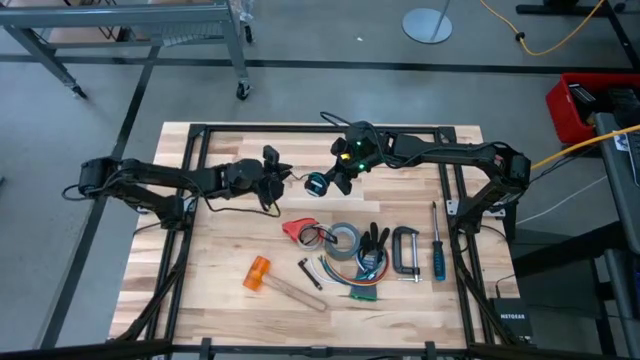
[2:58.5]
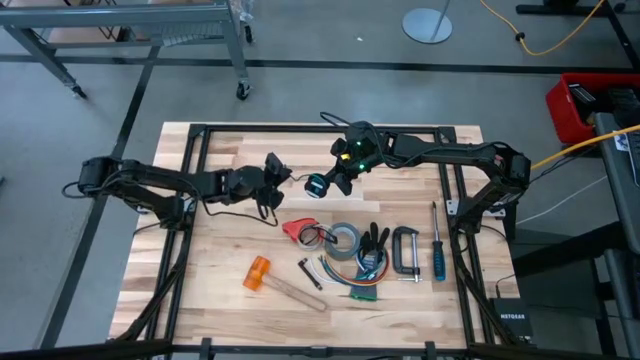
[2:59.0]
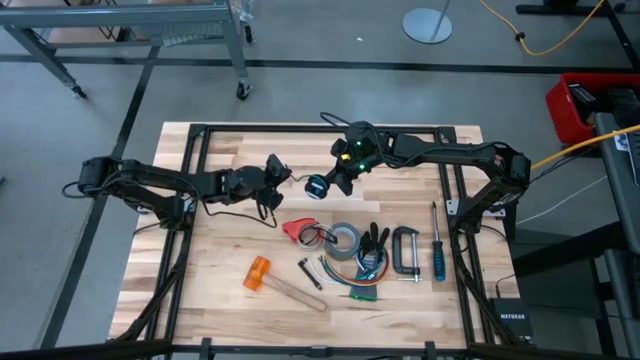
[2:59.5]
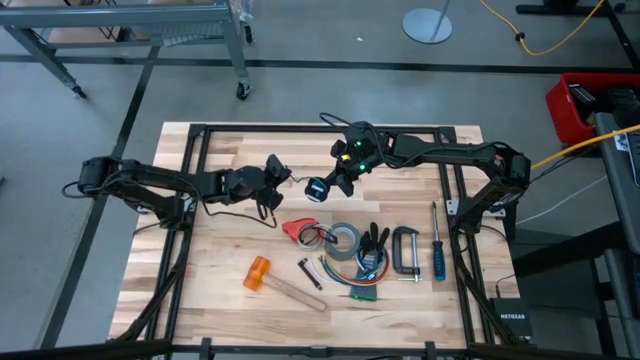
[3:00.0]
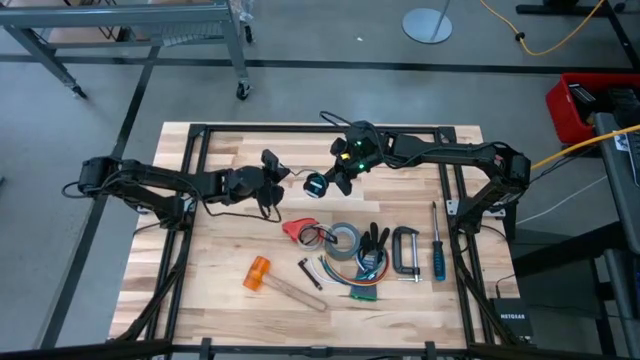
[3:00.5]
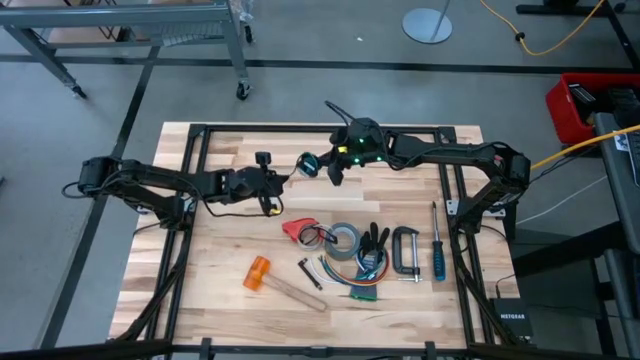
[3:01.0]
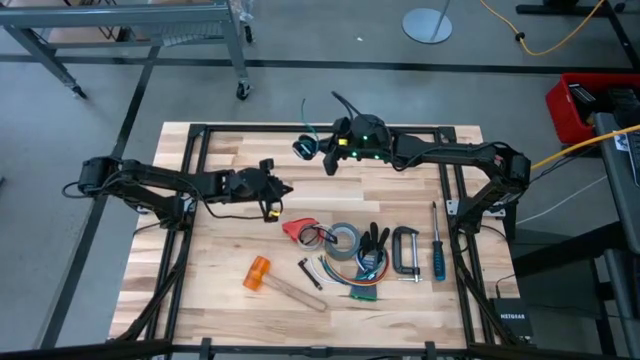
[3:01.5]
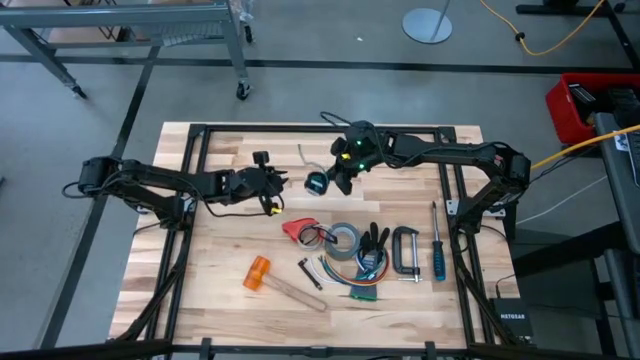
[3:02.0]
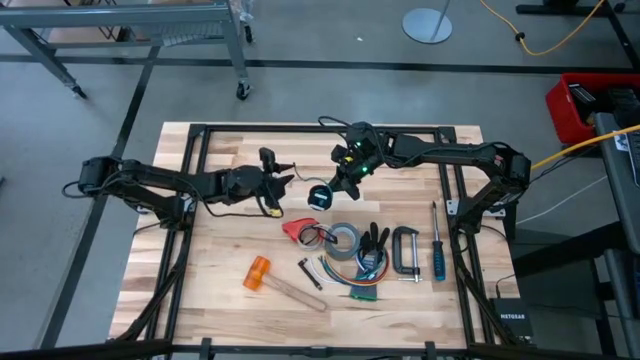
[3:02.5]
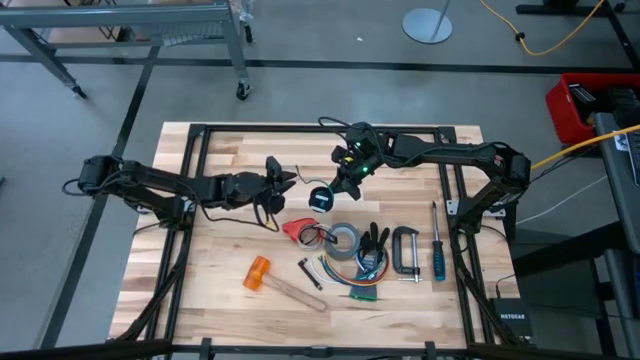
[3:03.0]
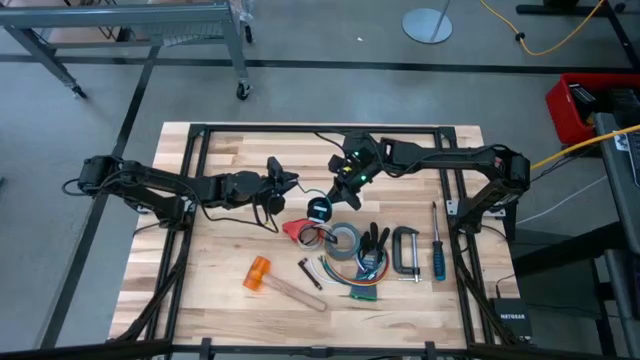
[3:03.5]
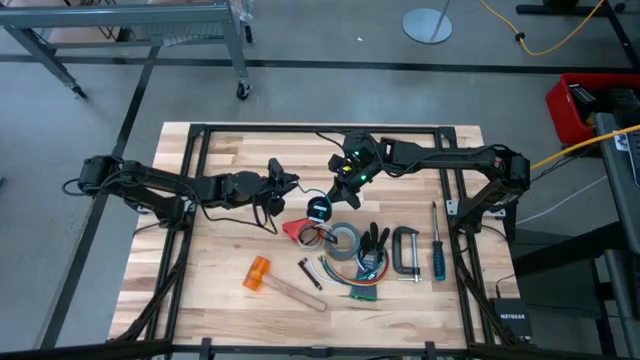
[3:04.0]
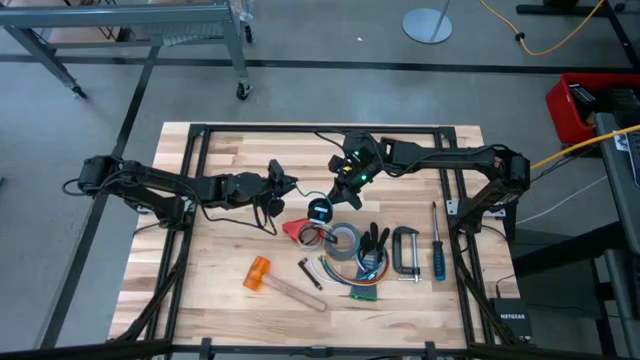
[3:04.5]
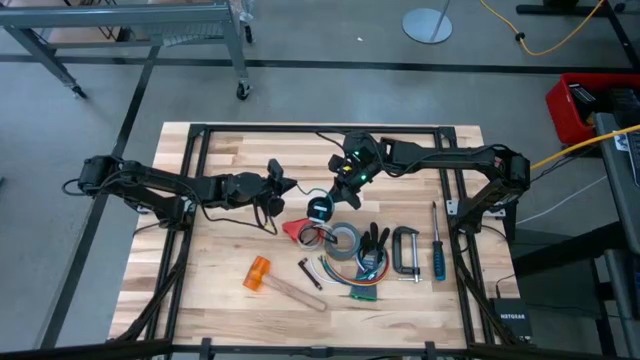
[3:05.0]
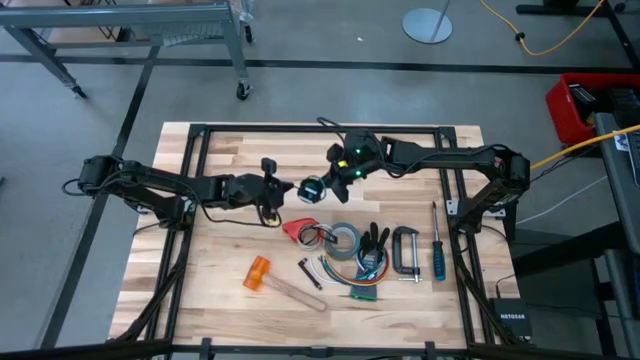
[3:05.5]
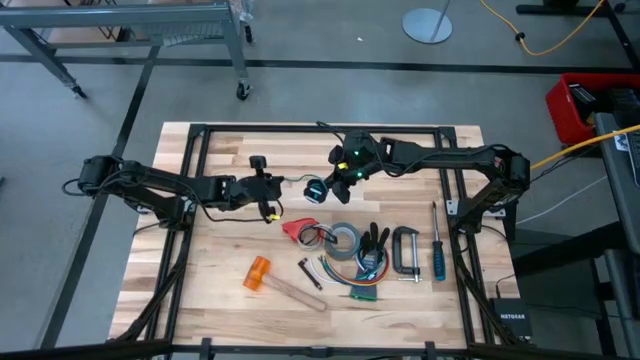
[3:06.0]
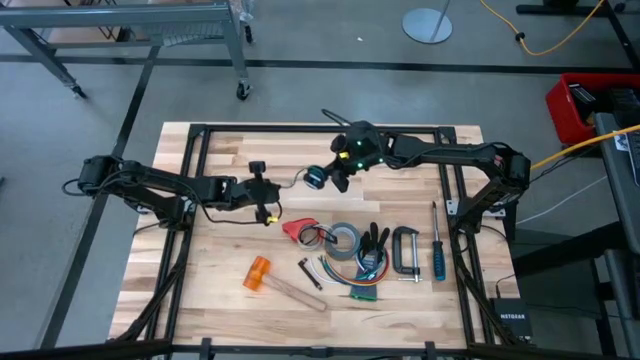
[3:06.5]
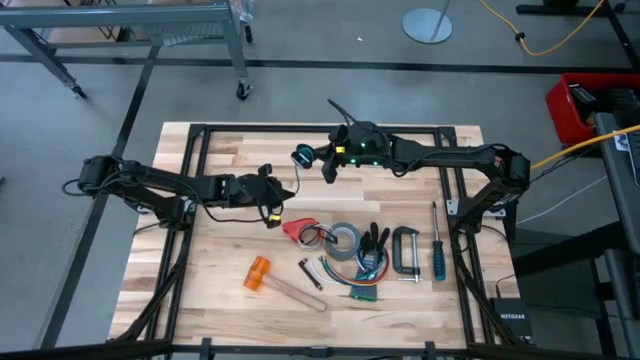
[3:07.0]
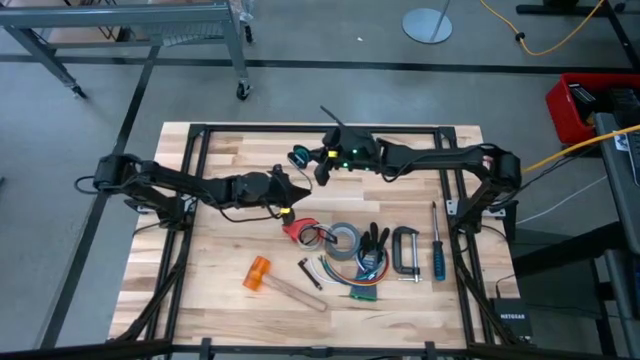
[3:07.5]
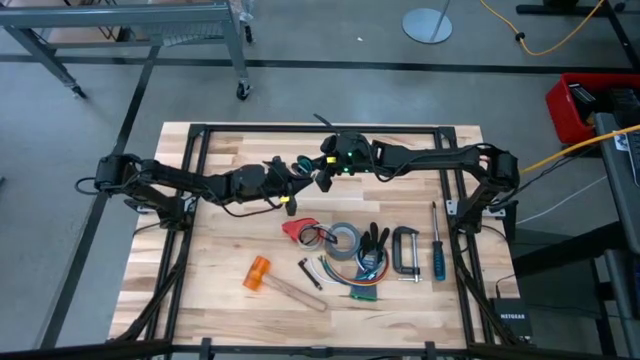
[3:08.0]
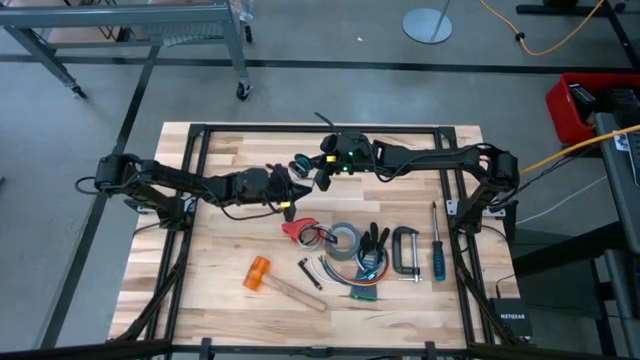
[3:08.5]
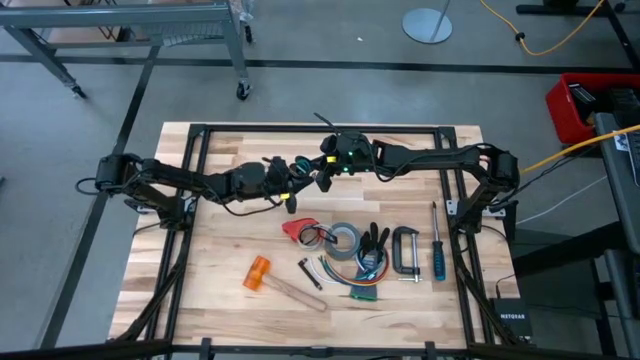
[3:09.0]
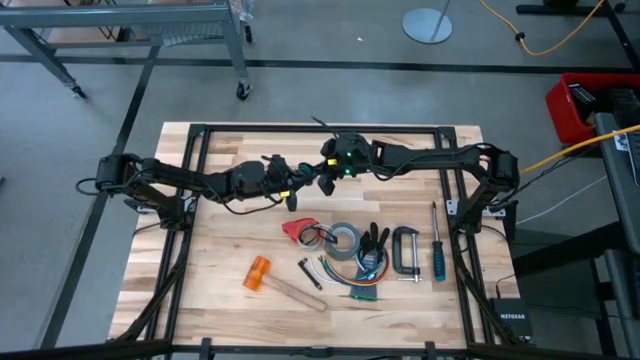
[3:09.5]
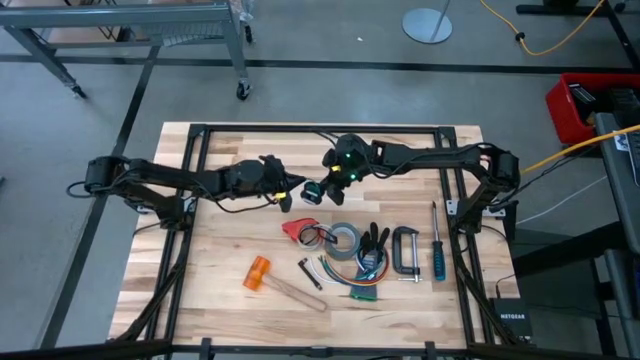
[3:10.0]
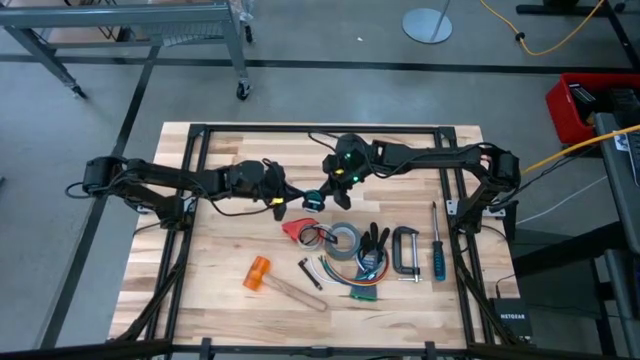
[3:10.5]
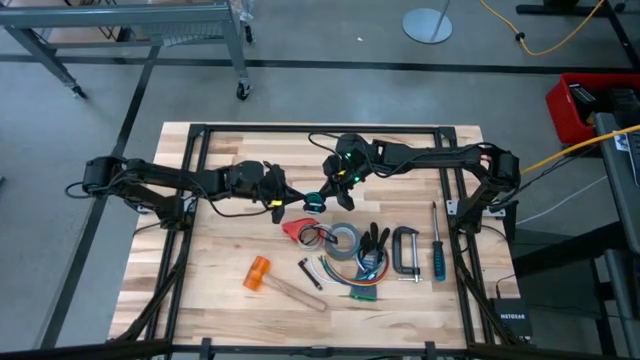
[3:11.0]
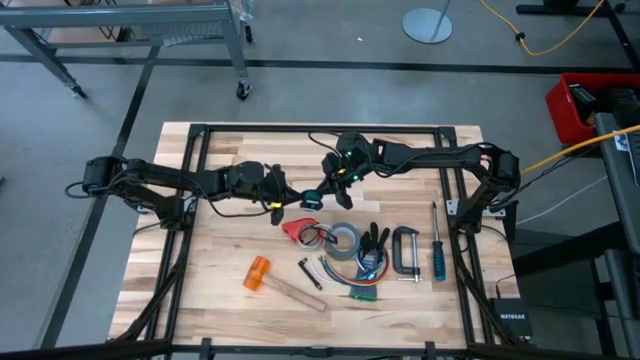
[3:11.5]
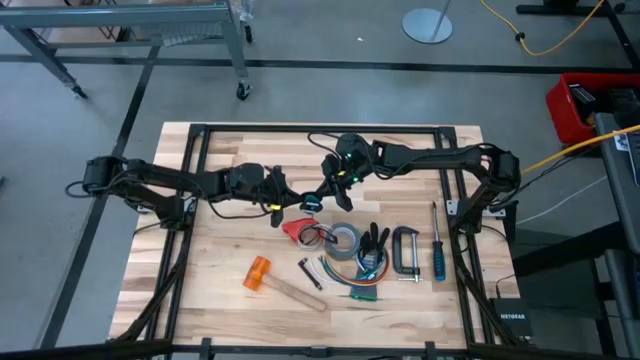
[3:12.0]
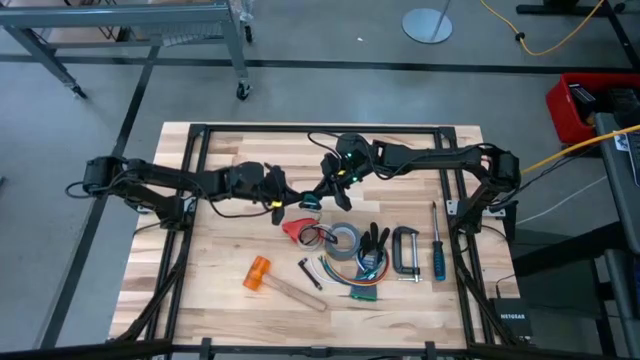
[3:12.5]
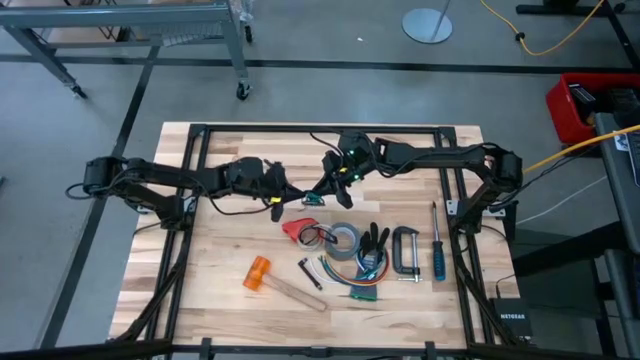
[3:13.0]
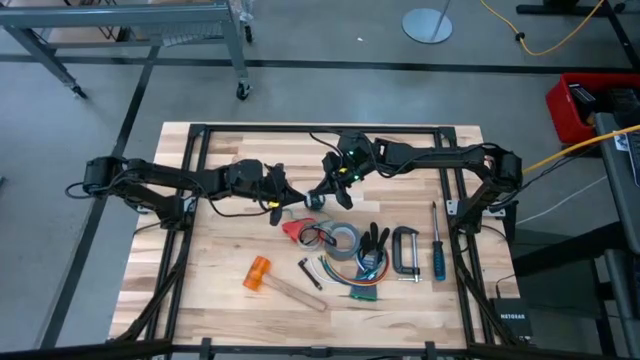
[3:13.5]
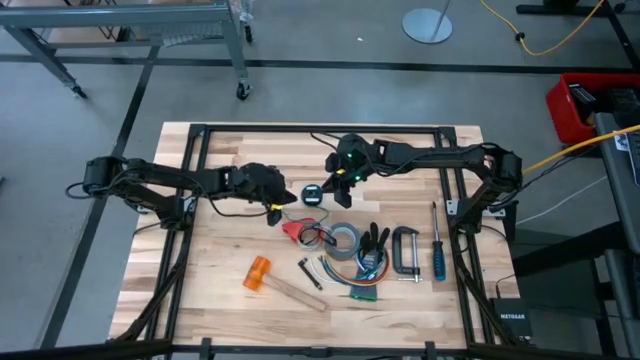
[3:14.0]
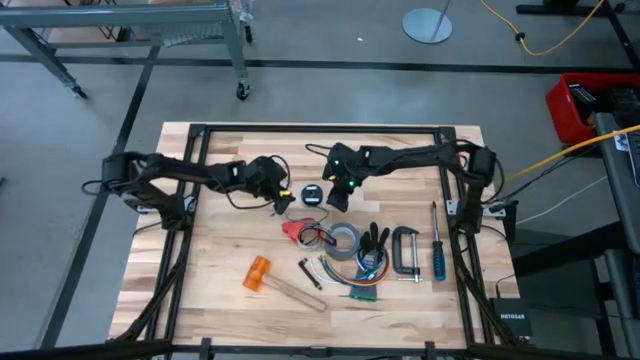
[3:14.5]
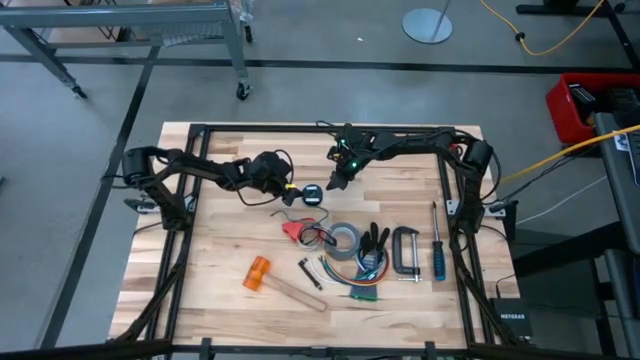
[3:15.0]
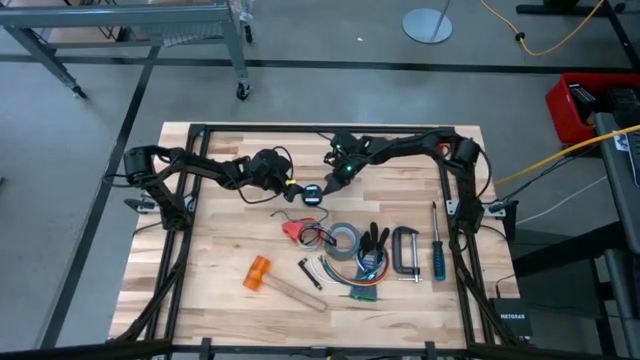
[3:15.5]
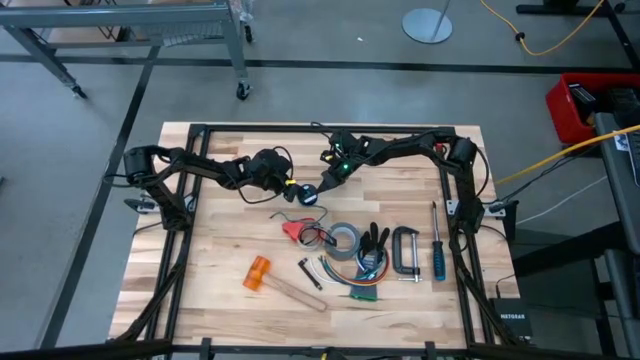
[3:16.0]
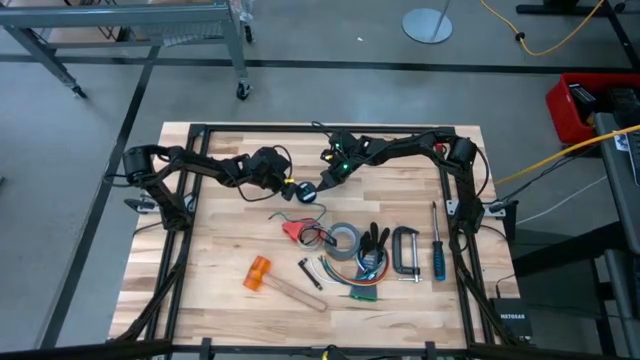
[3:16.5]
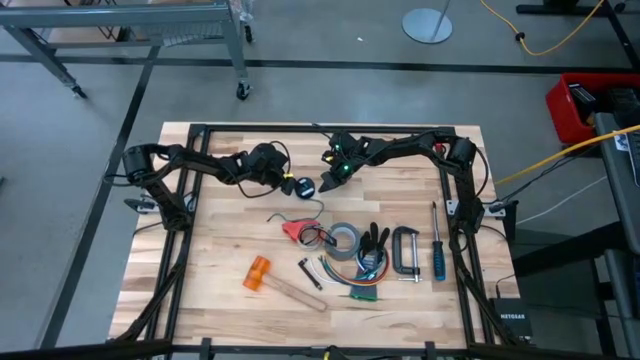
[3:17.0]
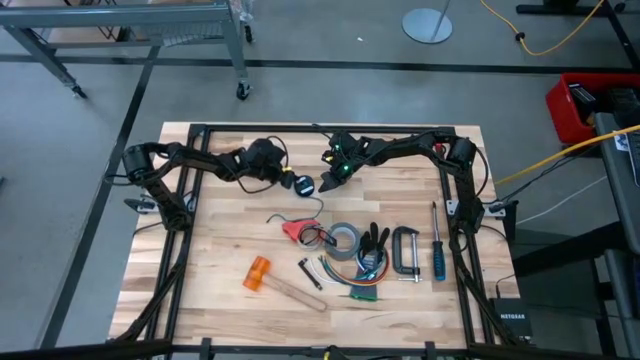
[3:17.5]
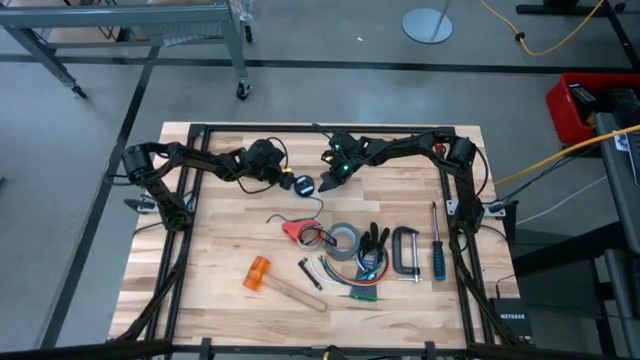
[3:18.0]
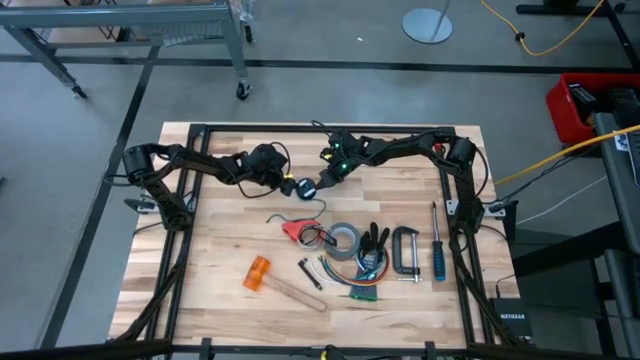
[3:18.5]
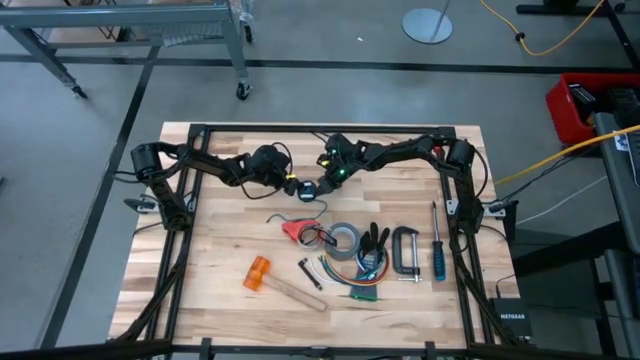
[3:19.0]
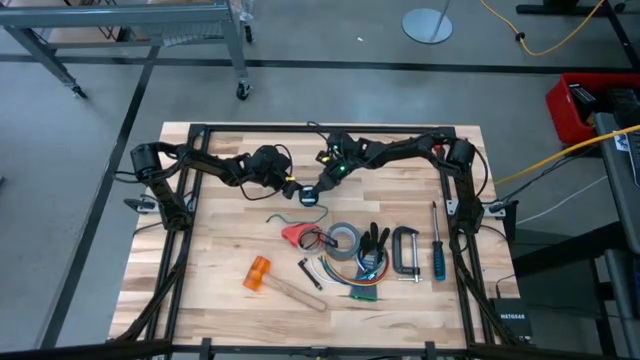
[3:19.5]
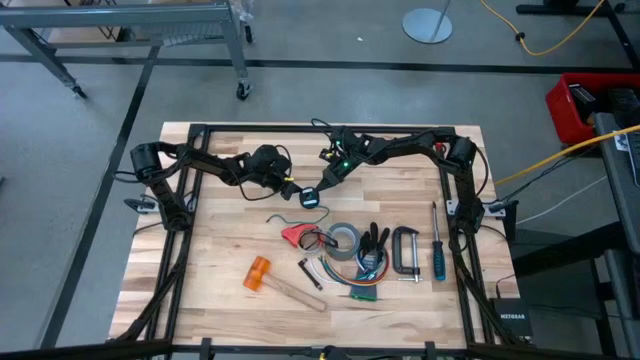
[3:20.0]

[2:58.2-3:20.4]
Task: Coil cords
Coil the green cable wire on the black spool
